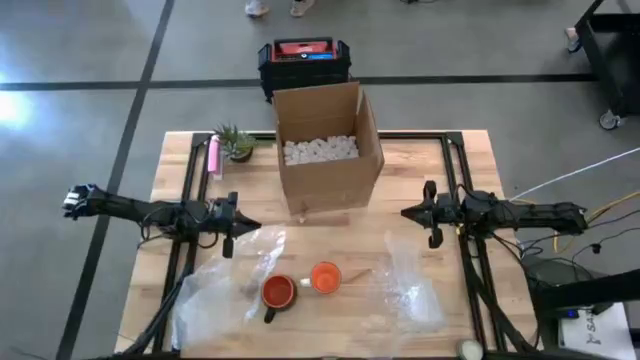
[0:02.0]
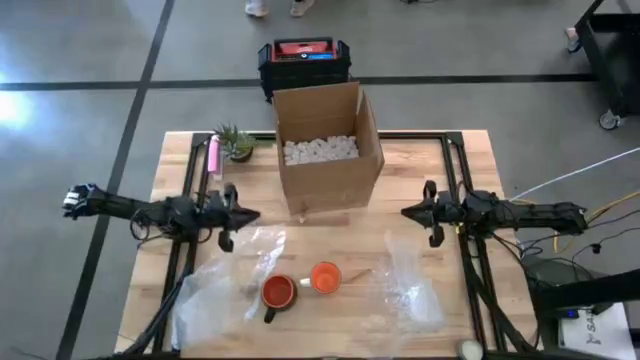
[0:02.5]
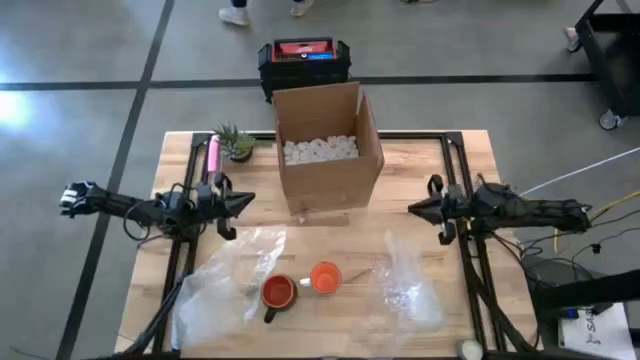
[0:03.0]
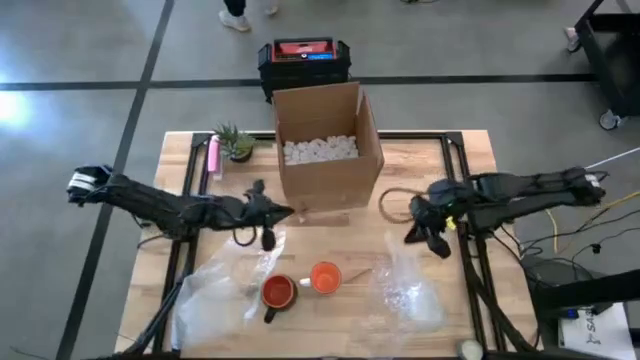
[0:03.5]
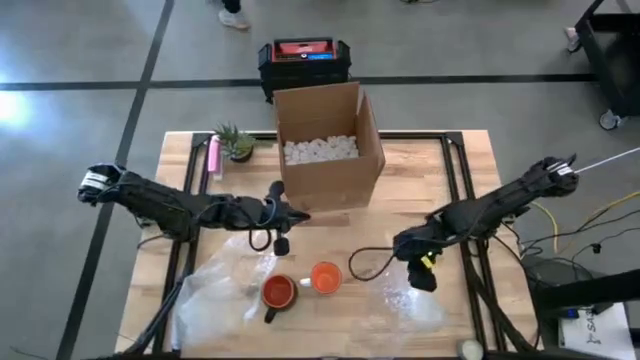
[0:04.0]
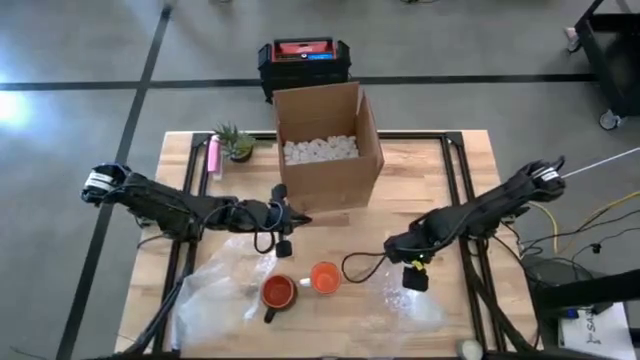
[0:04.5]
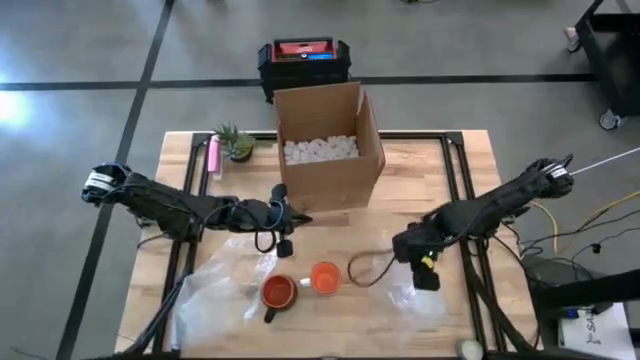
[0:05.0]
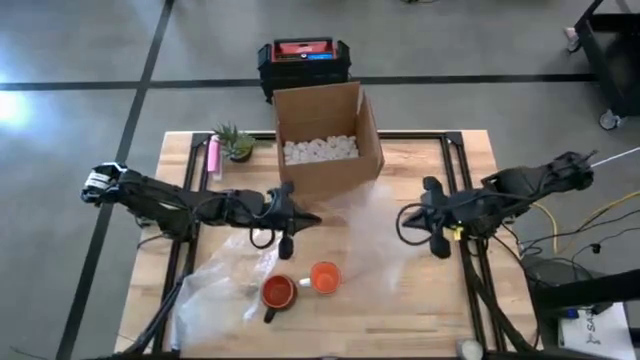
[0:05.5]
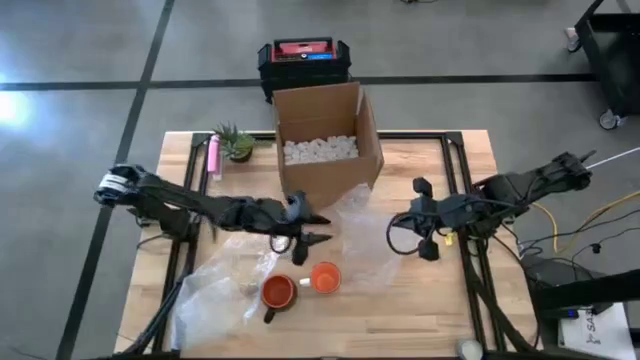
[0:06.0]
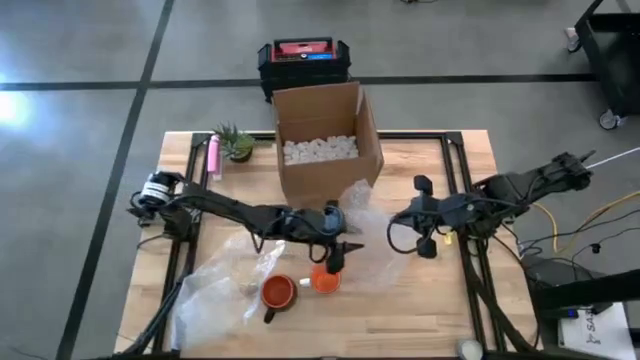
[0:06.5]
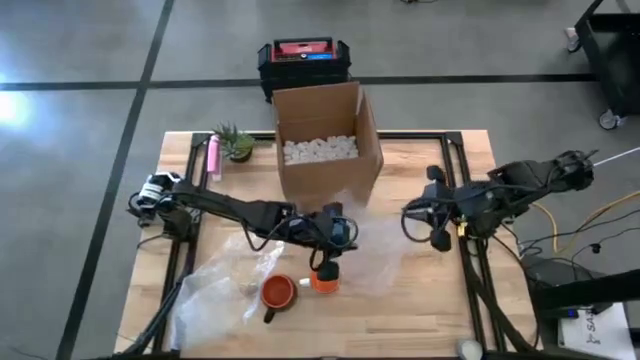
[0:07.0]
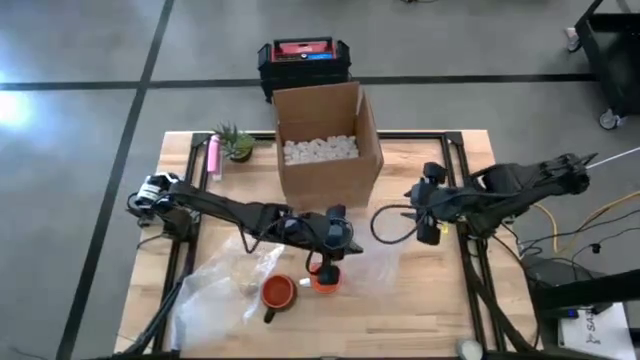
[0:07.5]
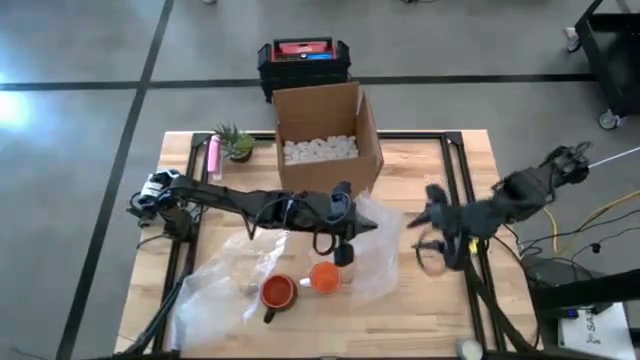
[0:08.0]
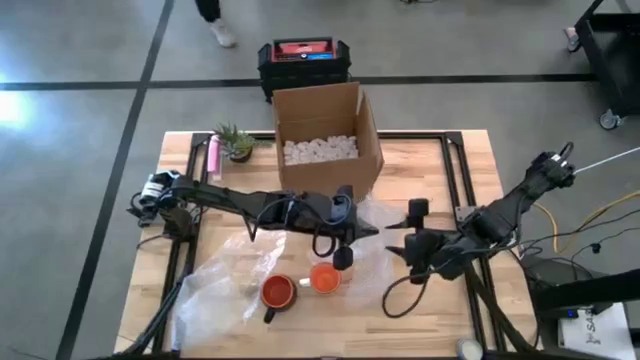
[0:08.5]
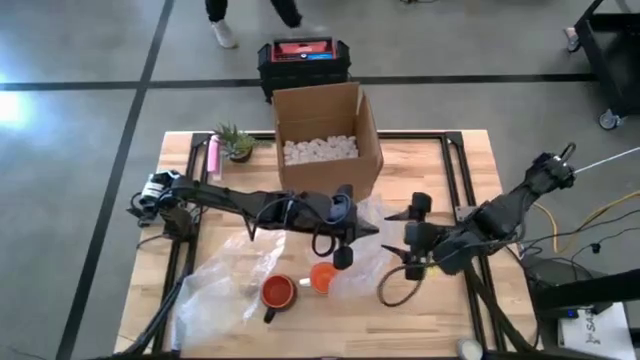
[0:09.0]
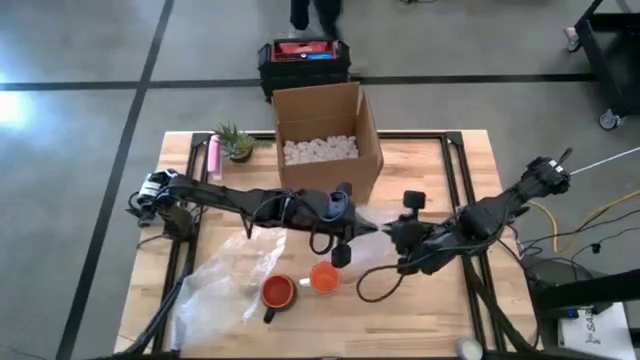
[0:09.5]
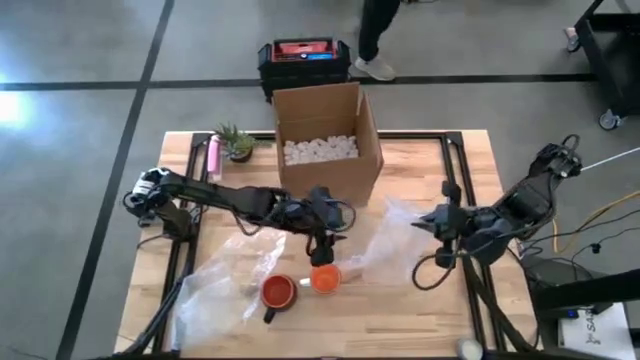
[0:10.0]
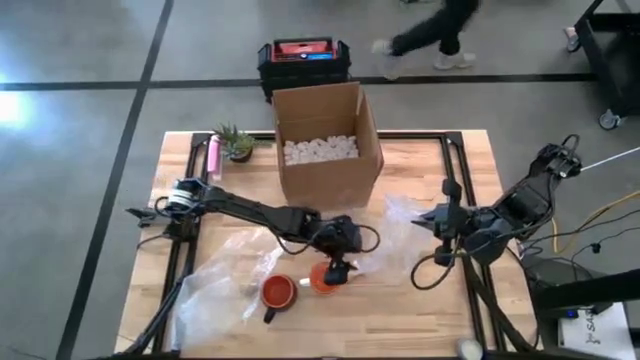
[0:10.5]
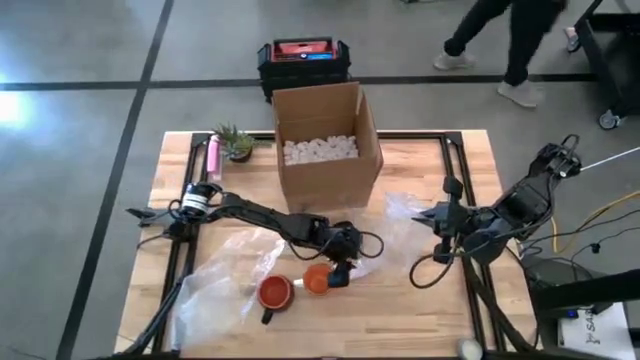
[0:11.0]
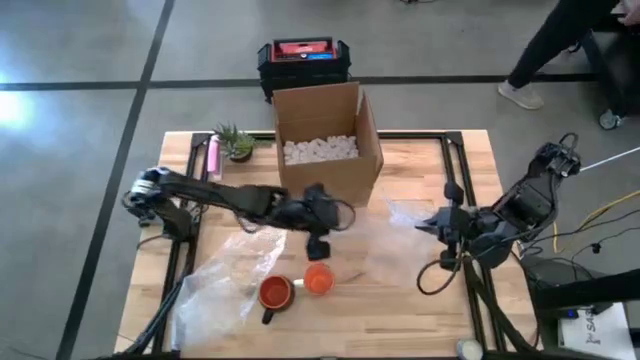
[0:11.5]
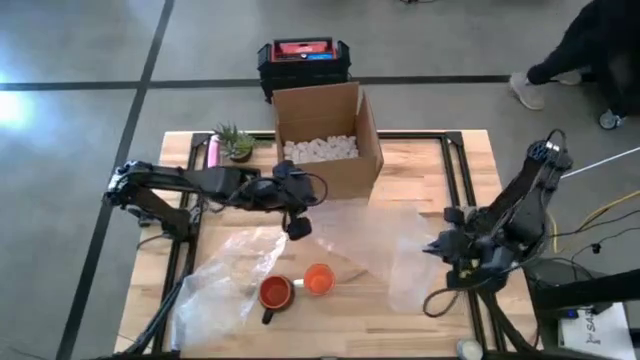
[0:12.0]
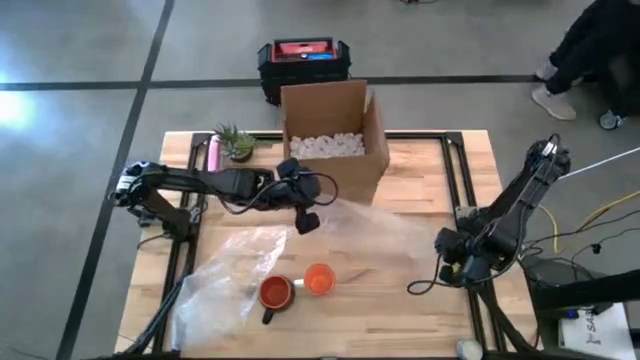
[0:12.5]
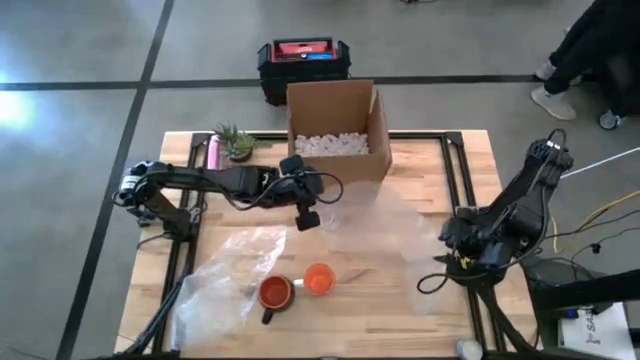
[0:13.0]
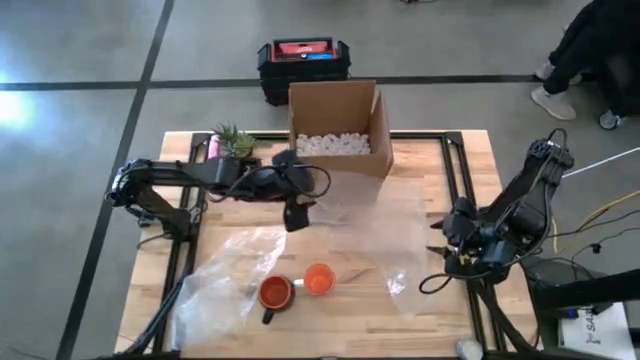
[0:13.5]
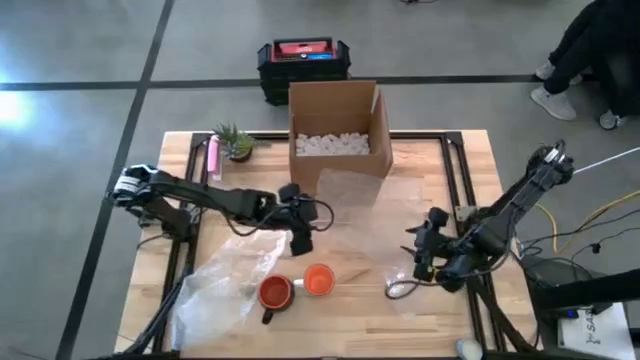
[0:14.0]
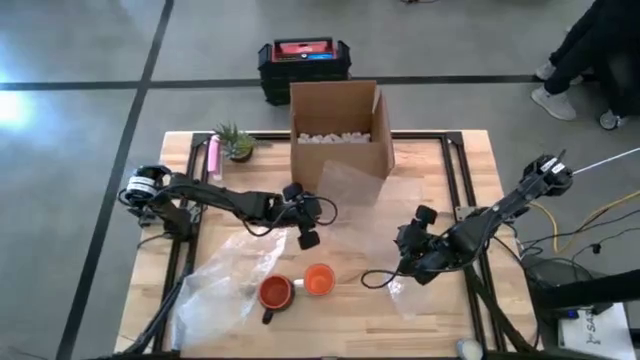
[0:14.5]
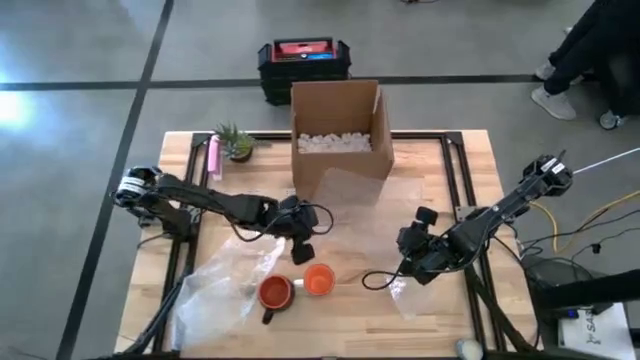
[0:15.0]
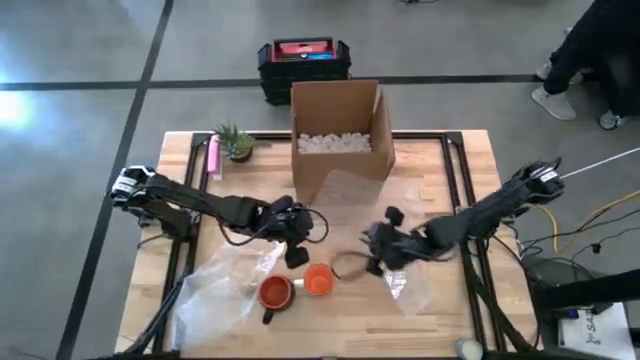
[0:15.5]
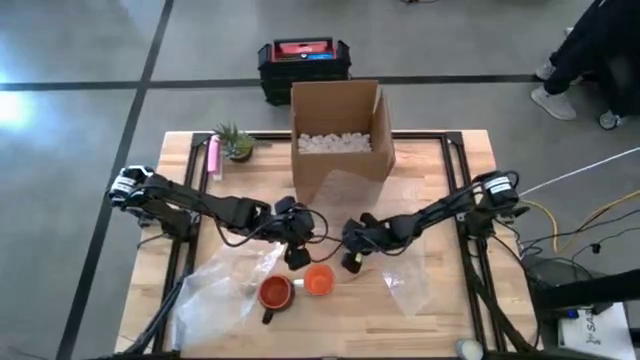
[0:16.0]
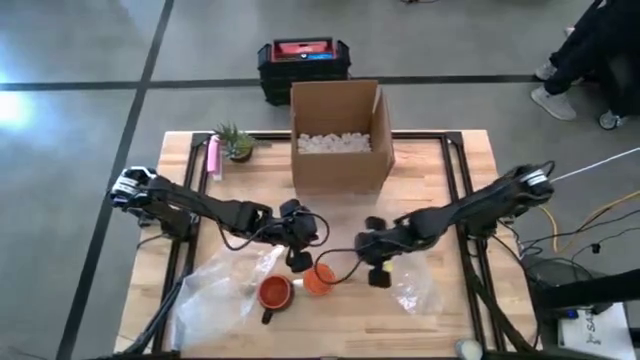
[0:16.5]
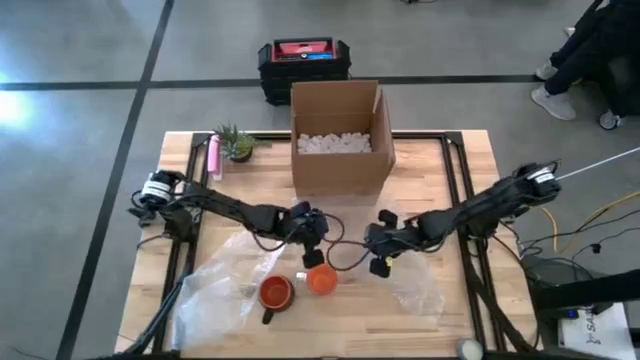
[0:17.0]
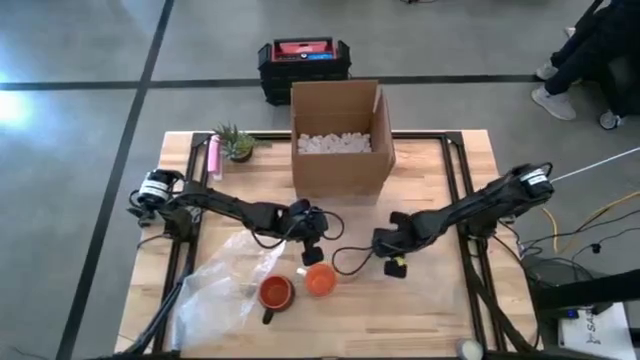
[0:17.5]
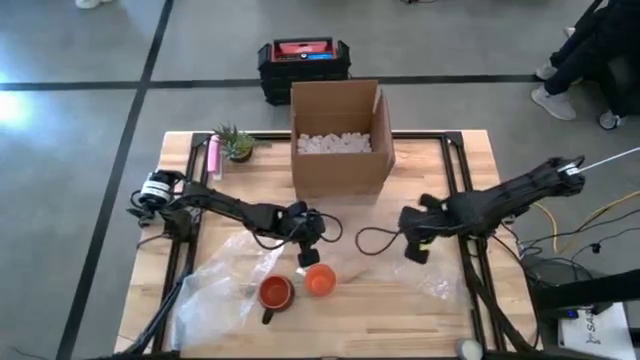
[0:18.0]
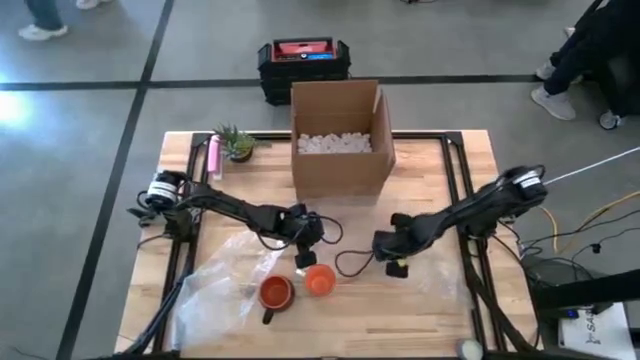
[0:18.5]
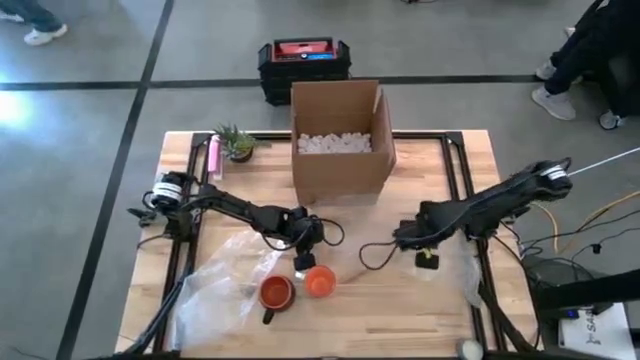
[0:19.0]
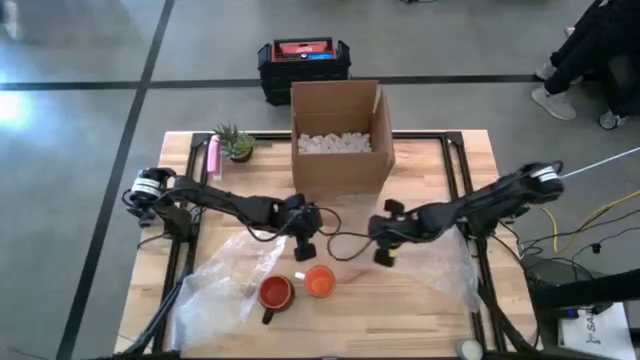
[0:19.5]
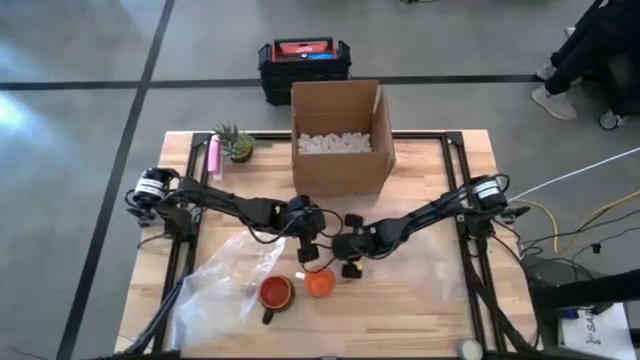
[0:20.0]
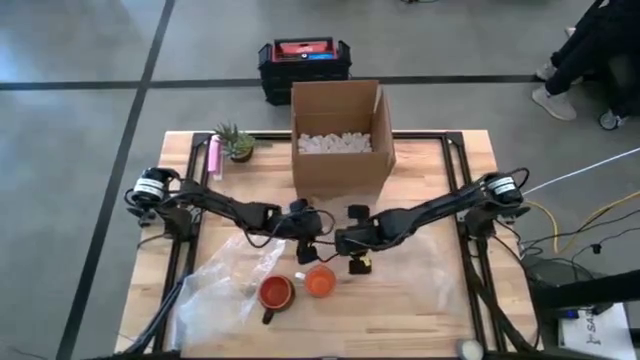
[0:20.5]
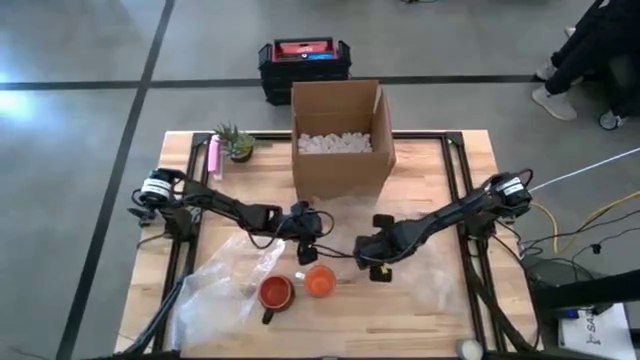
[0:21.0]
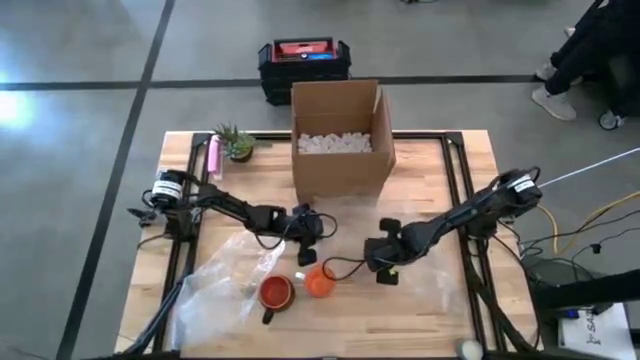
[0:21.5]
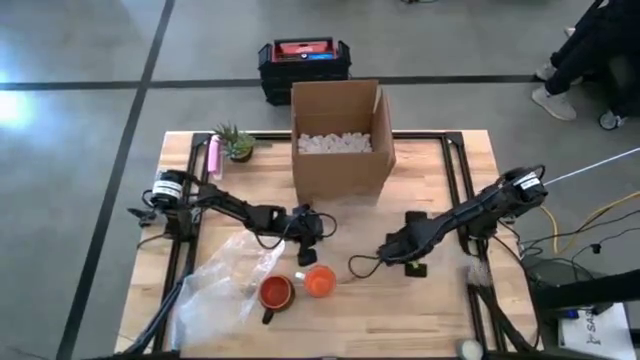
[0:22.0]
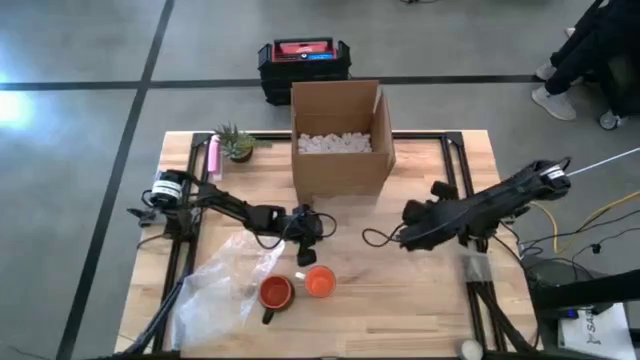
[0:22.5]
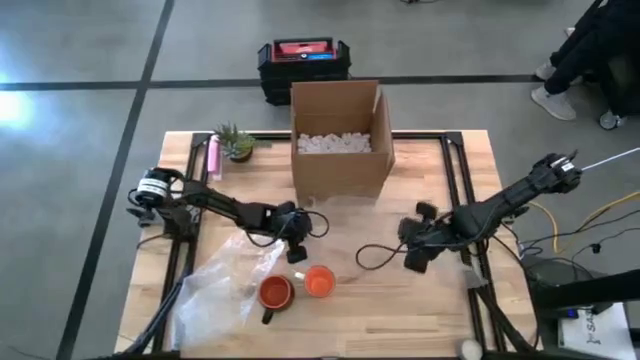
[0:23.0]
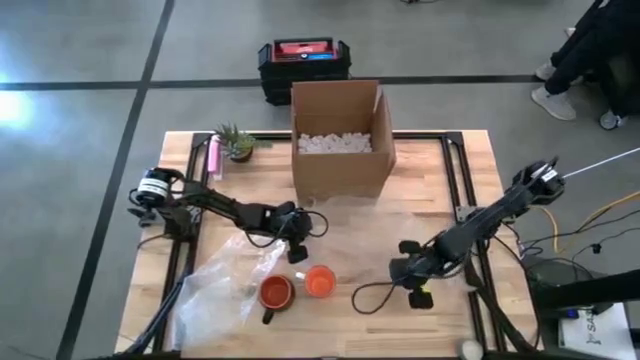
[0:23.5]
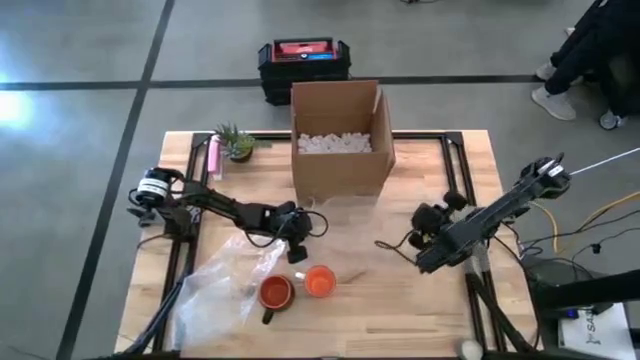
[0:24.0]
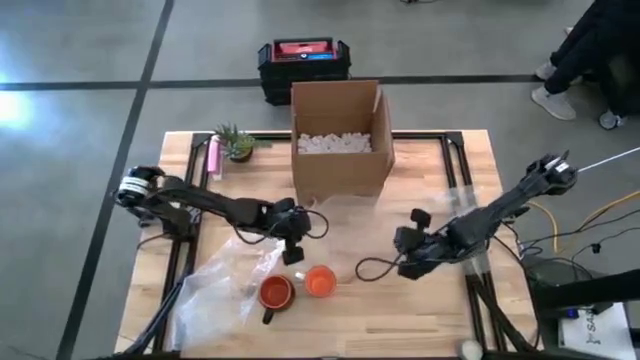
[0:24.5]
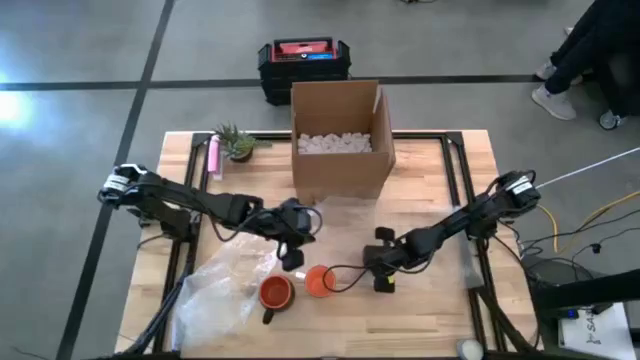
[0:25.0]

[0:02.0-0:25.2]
Task: wrap mug
Prepare the right transparent bubble wrap
